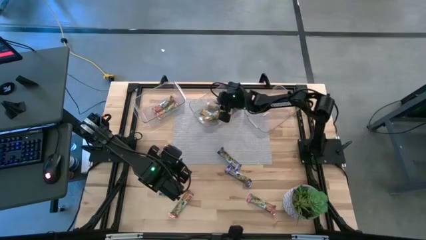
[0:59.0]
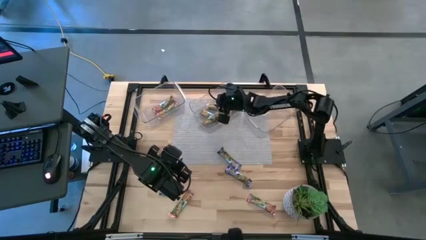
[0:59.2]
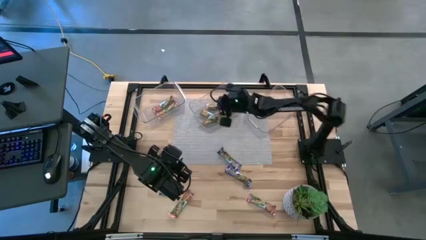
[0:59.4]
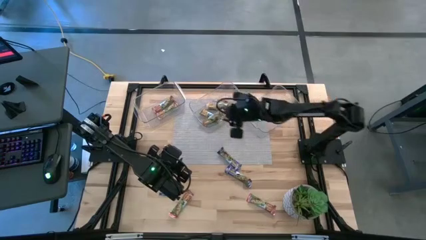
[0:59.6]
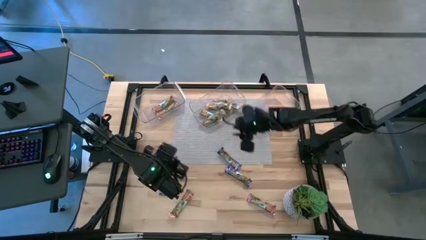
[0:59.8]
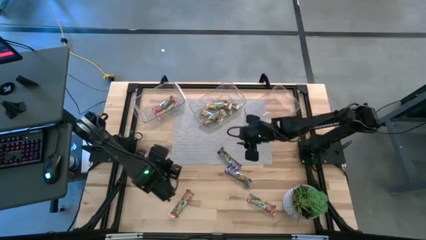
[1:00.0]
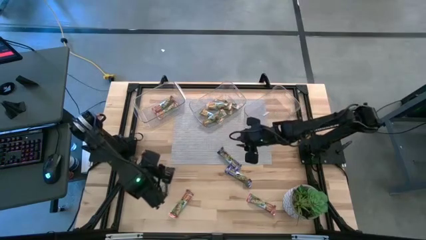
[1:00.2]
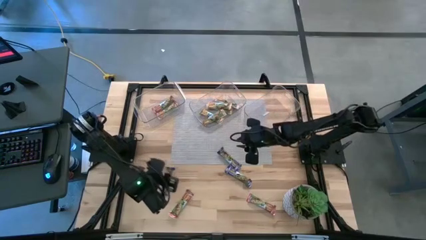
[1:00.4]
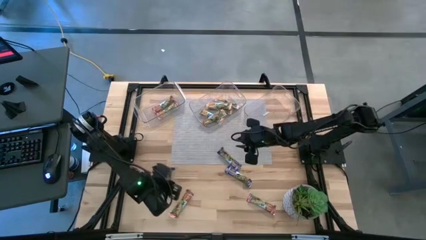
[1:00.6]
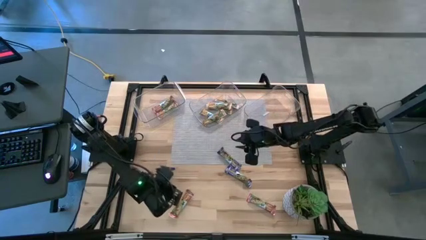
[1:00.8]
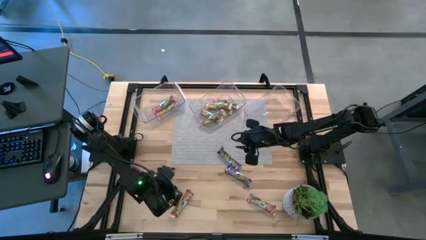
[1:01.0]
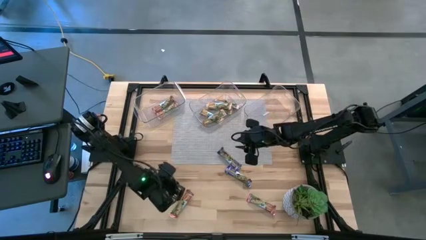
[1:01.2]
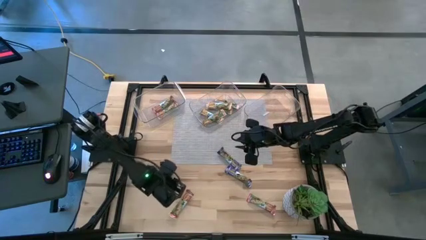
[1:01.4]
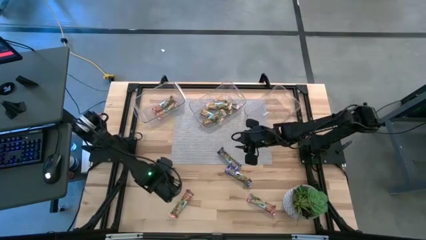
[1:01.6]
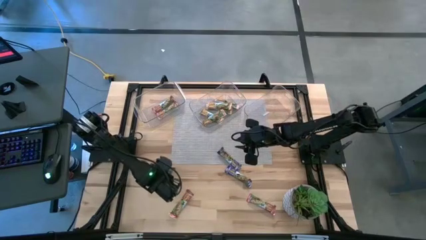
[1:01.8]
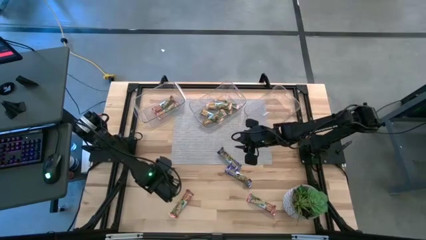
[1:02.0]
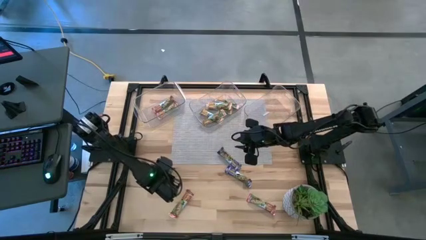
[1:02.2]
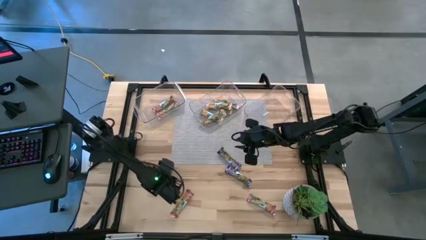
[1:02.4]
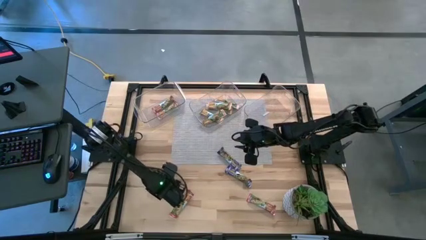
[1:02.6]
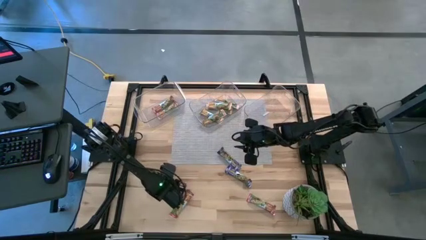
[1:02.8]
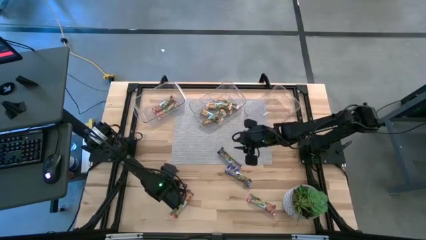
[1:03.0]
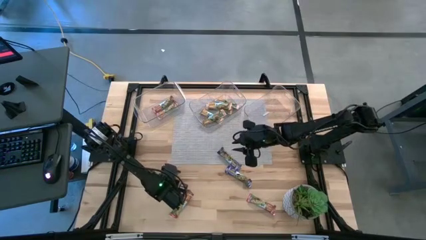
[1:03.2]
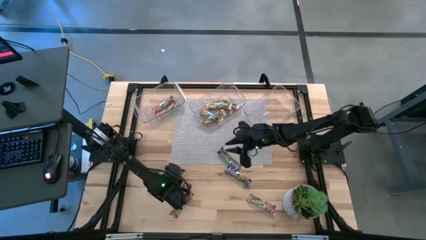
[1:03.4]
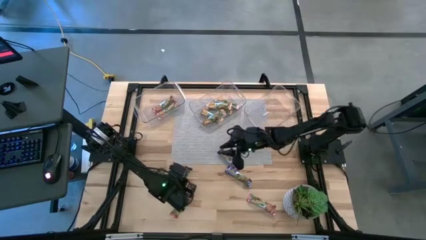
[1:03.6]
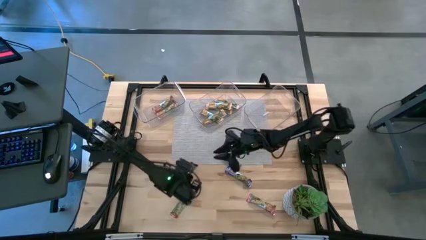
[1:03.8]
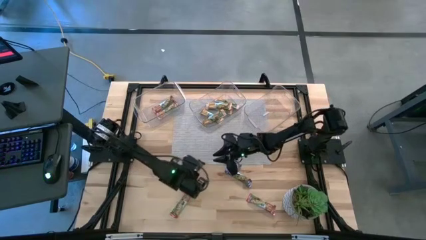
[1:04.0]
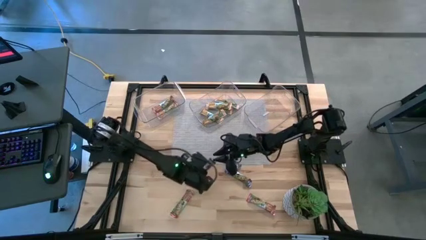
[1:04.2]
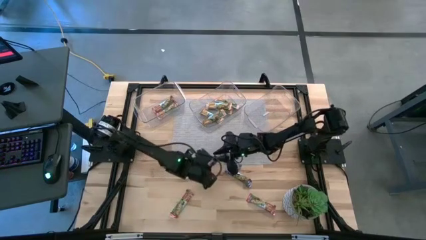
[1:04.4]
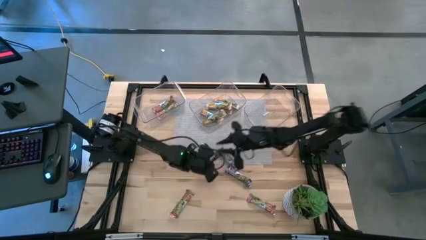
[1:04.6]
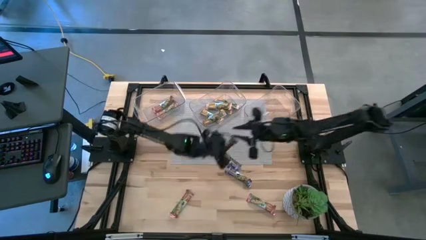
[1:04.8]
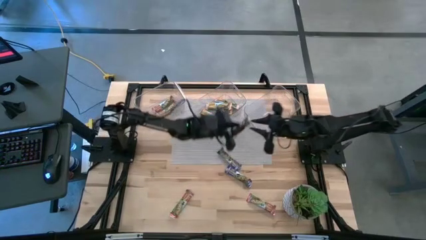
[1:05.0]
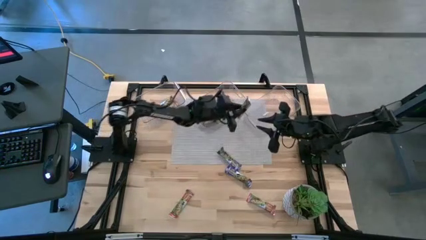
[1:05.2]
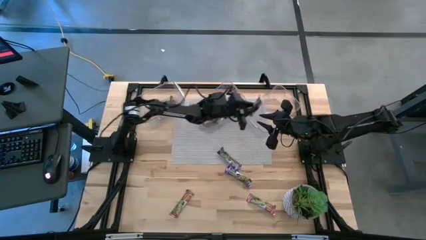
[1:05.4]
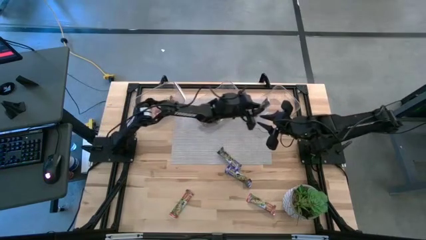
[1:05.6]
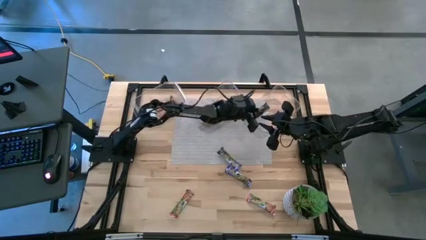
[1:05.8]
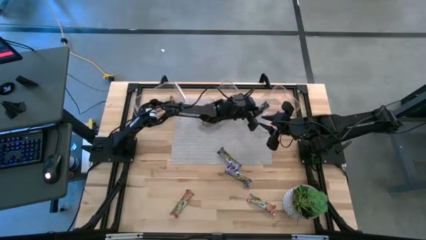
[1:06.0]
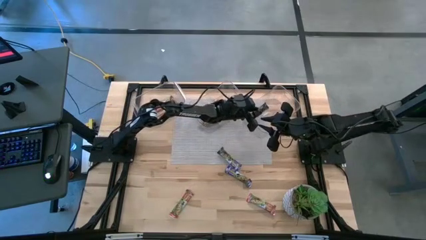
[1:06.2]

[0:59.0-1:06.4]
Task: Pick and place Granola Bars by type
Put the blue granola bar into the right transparent bin

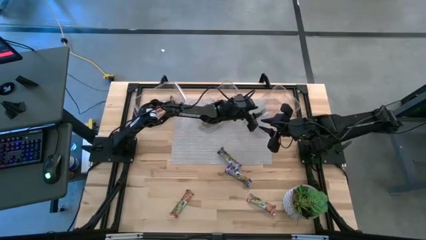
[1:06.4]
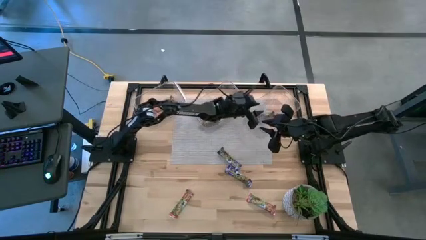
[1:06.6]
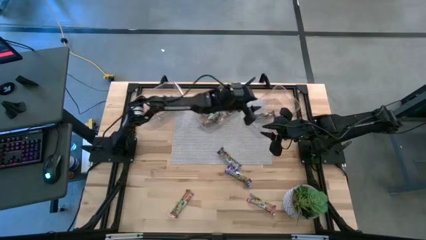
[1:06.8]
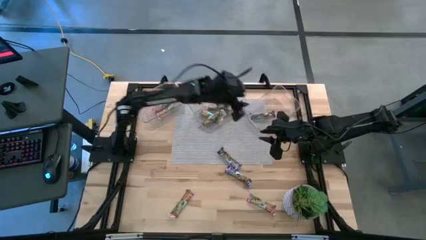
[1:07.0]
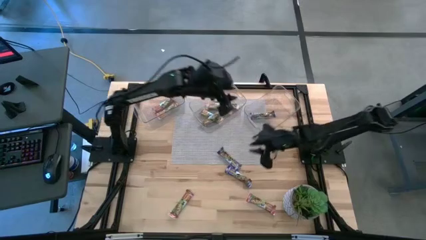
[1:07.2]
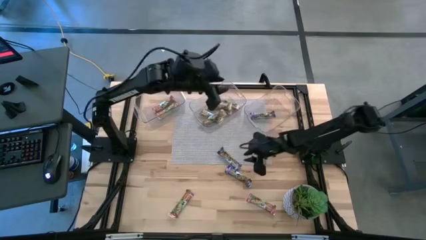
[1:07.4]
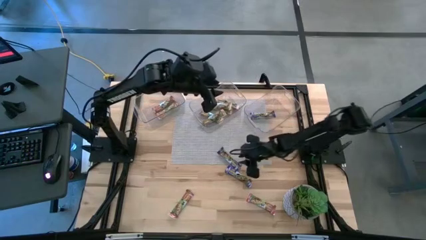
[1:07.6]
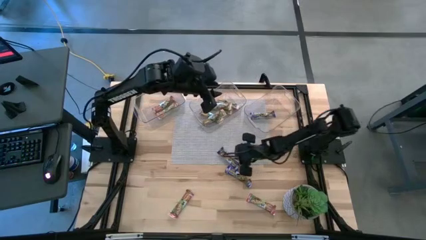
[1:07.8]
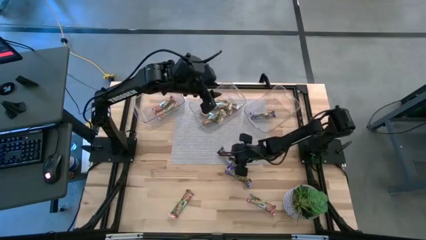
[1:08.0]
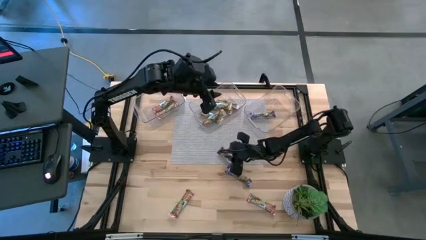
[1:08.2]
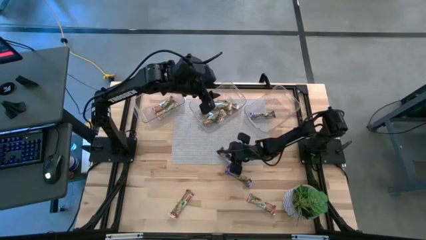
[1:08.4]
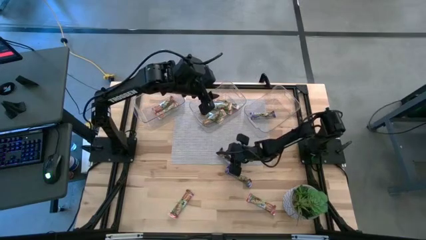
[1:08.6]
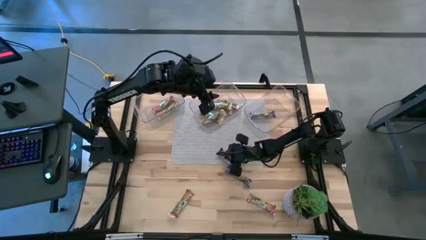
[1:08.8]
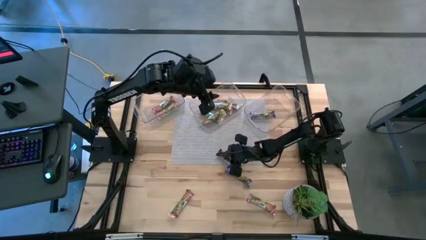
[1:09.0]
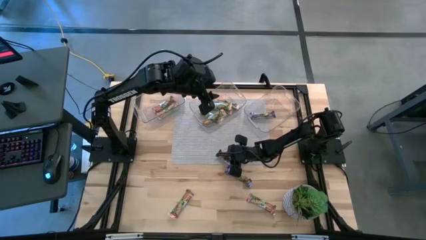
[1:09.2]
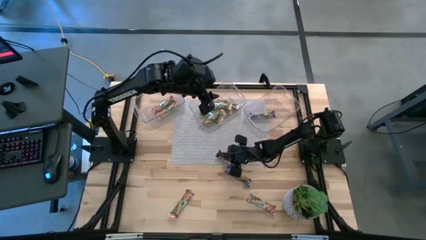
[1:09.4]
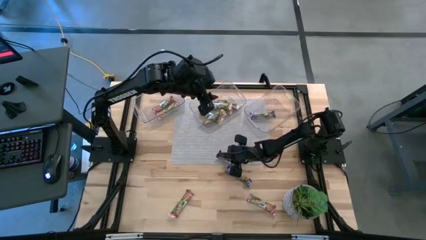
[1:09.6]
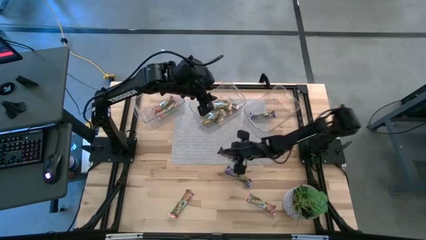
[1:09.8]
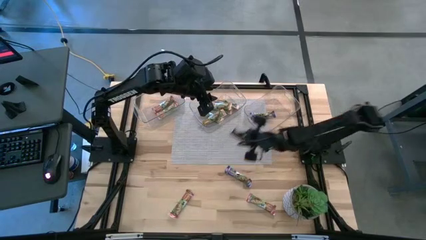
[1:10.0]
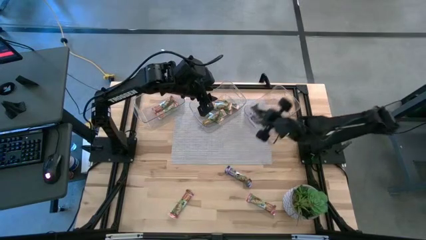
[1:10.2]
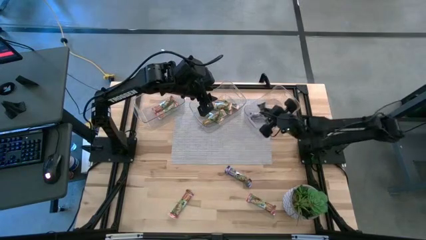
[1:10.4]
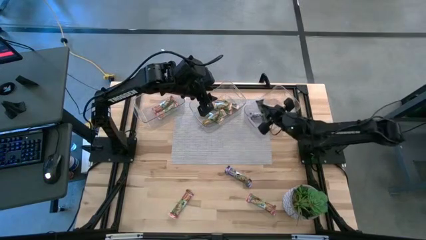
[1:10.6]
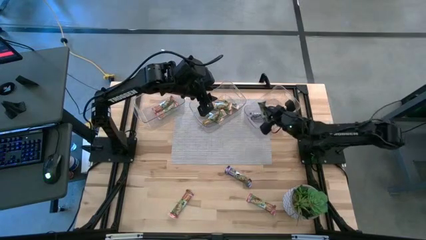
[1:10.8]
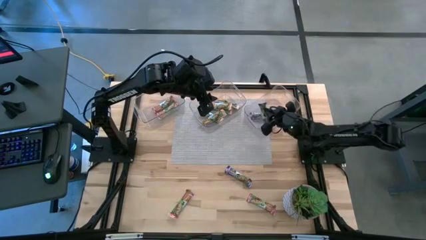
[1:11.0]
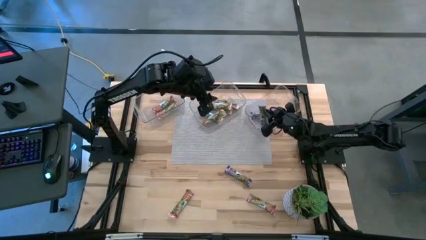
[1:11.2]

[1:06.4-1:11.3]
Put the blue granola bar into the right transparent bin

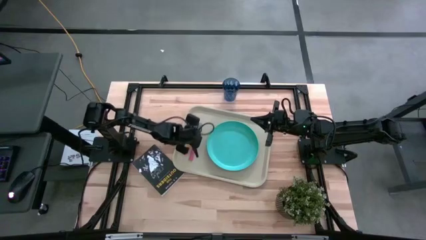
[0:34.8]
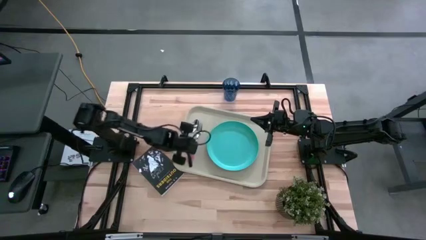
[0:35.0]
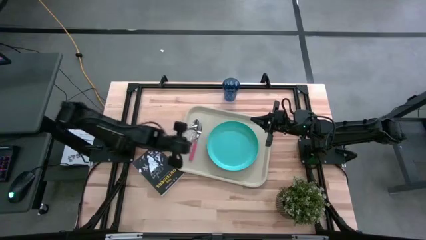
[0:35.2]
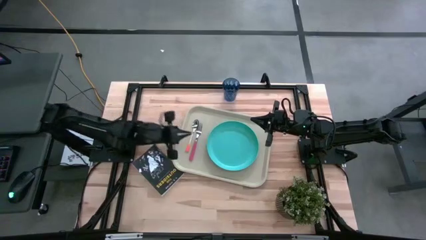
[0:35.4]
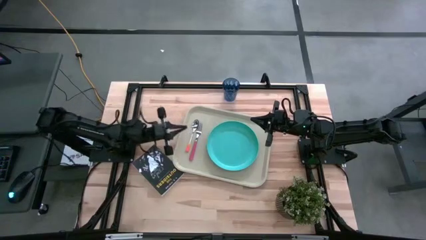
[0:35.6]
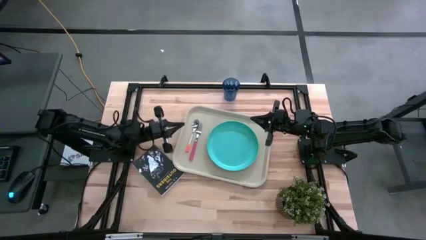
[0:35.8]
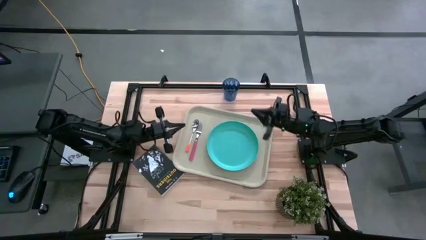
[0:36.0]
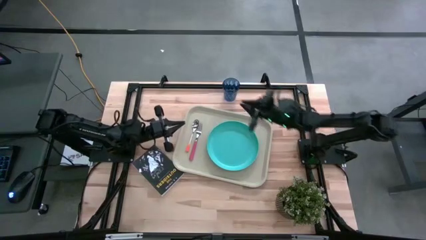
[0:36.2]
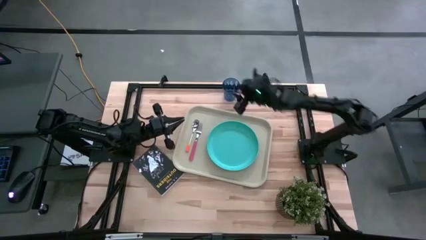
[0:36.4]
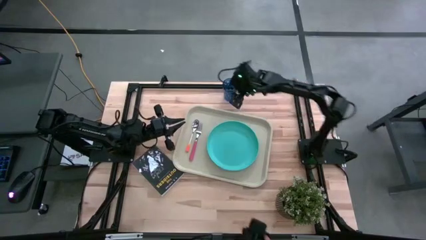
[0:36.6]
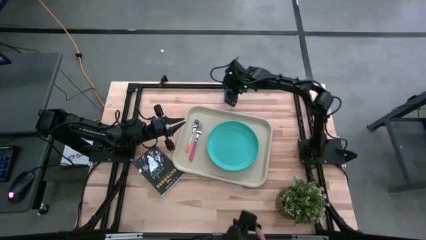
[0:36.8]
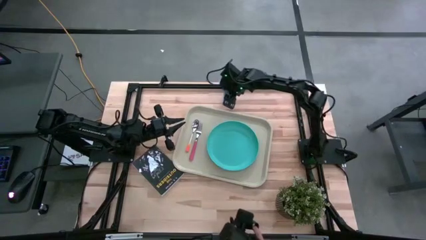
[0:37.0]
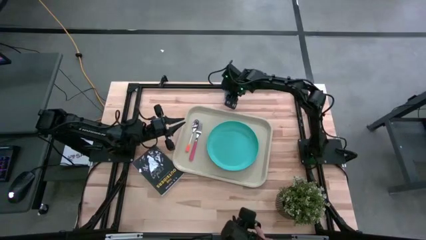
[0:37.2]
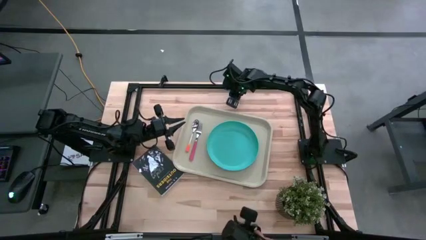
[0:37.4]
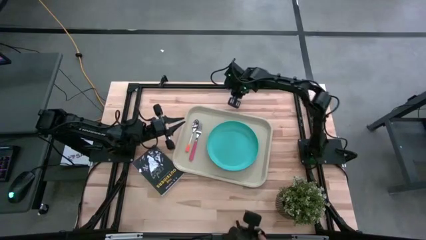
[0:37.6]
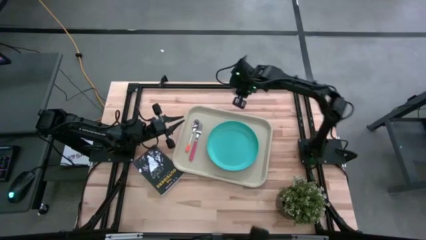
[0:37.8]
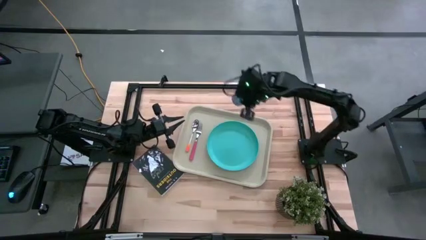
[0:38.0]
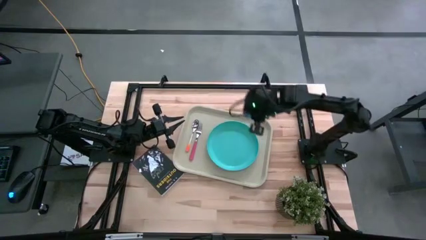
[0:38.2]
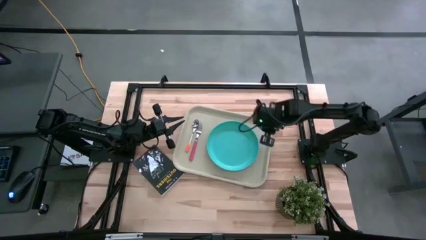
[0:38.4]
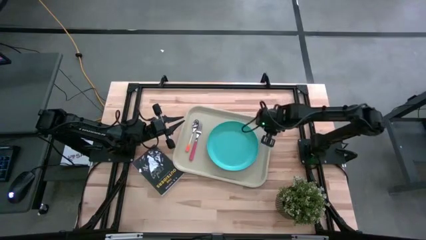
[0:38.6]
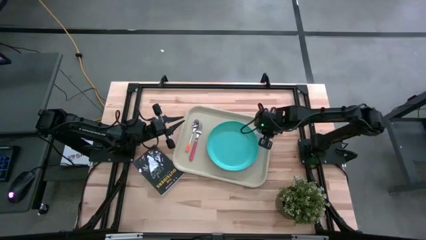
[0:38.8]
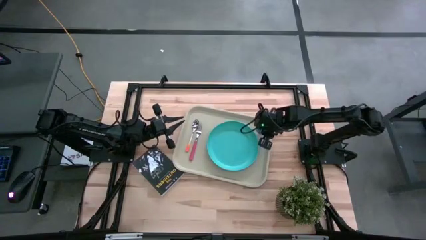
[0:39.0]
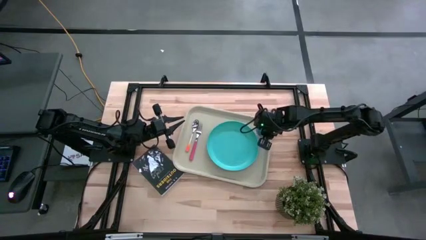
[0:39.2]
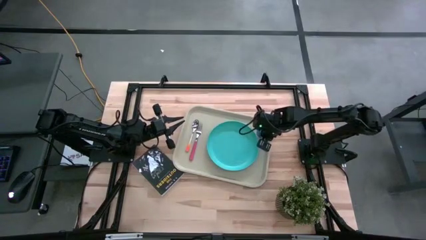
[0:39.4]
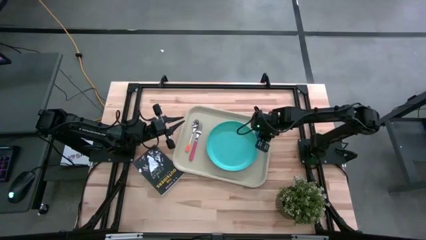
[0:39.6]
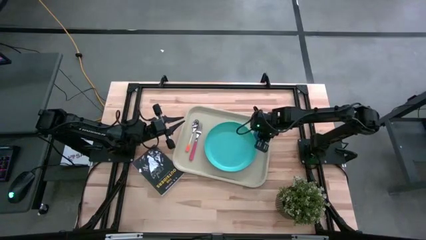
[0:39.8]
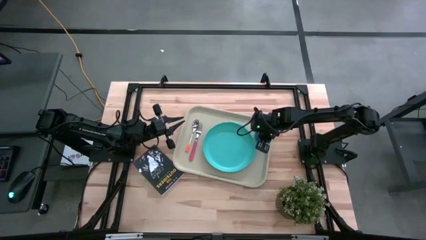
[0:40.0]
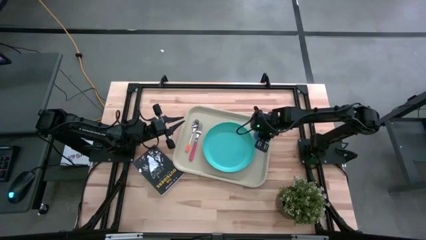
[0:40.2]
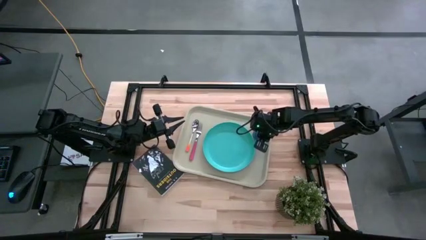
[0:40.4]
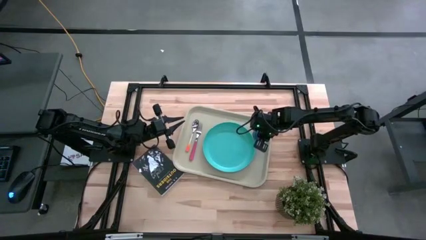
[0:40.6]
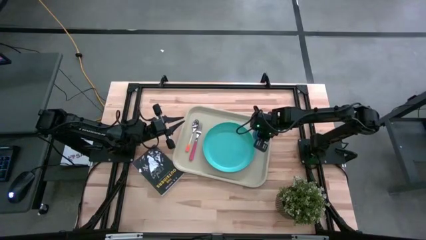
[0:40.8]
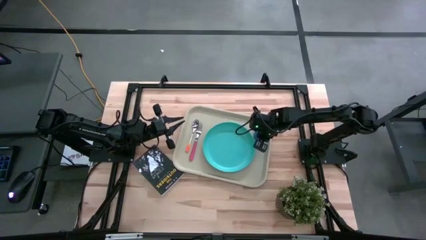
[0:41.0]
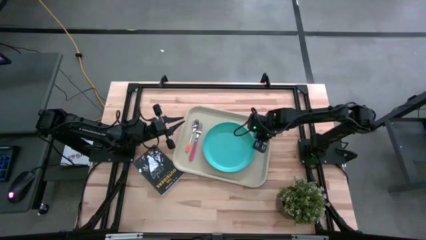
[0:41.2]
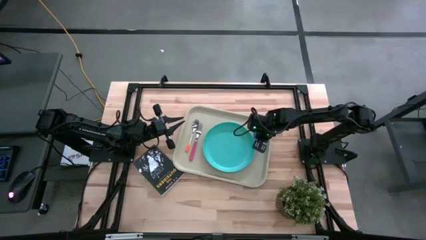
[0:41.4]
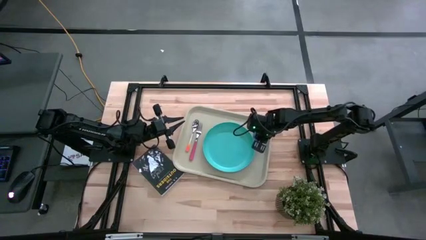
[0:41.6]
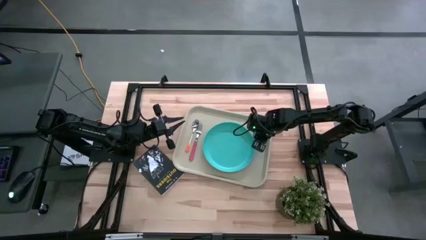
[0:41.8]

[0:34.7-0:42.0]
Task: Pick and place plate/cup/fork/spoon on tray
Put the blue cup on the top right of the green plate
